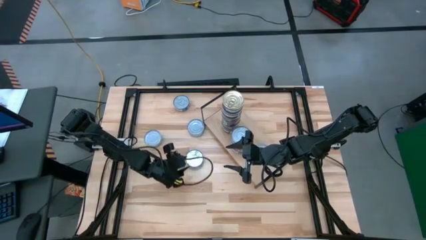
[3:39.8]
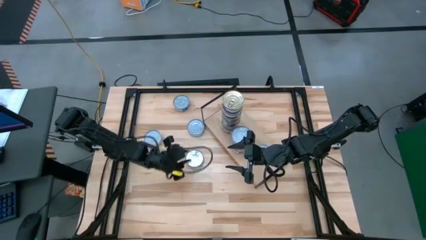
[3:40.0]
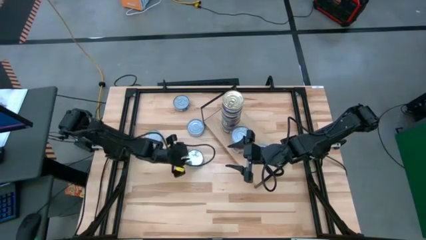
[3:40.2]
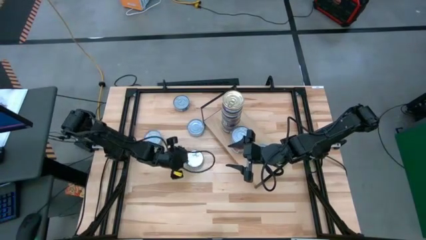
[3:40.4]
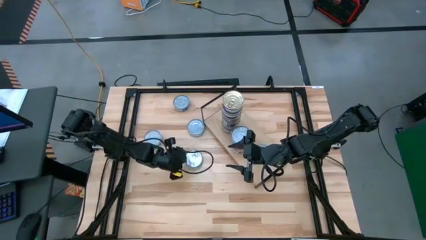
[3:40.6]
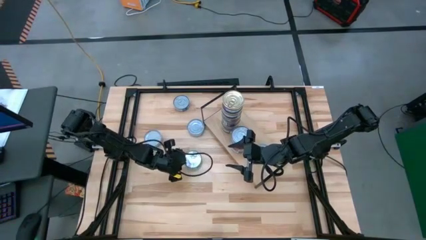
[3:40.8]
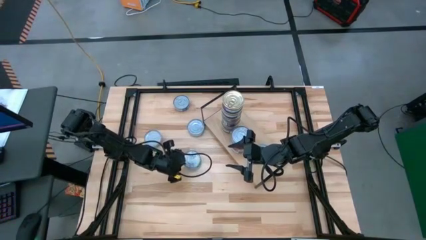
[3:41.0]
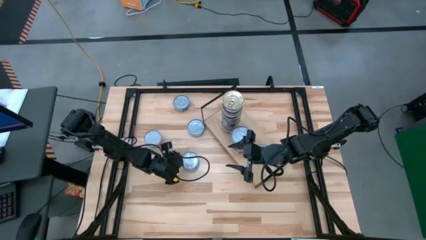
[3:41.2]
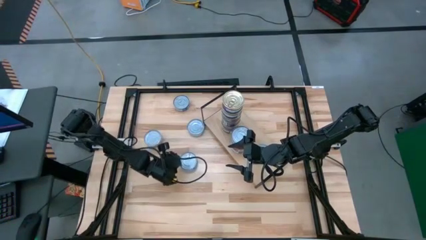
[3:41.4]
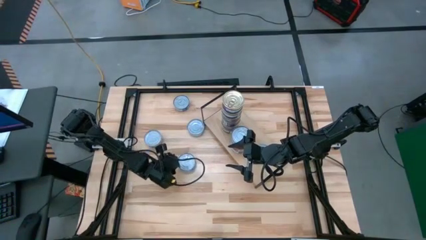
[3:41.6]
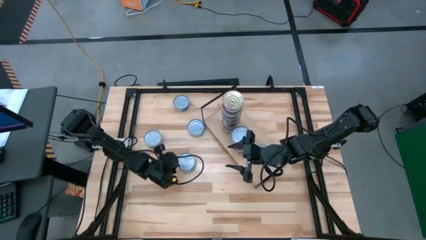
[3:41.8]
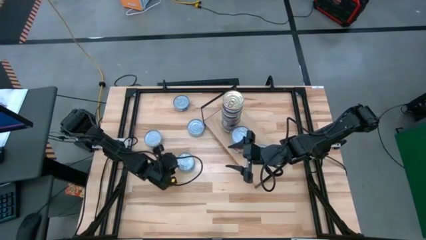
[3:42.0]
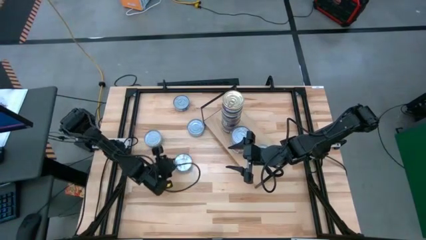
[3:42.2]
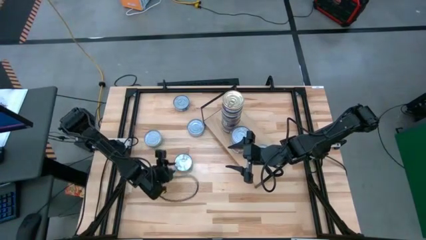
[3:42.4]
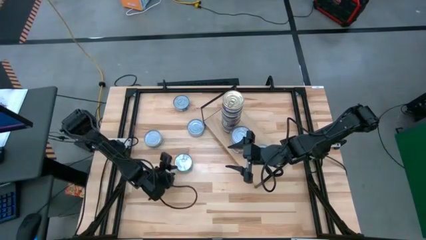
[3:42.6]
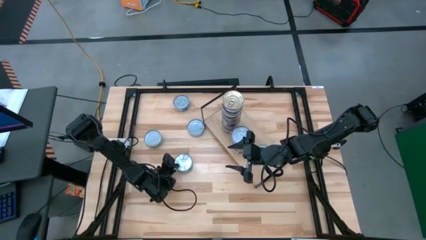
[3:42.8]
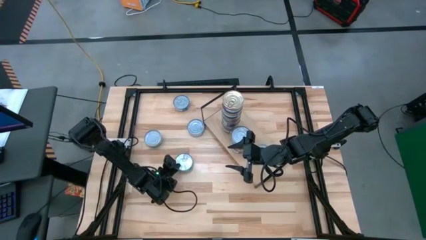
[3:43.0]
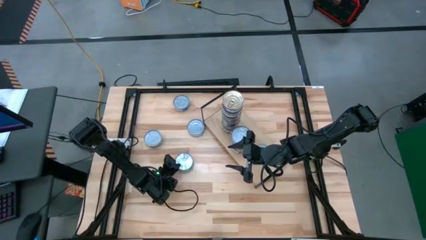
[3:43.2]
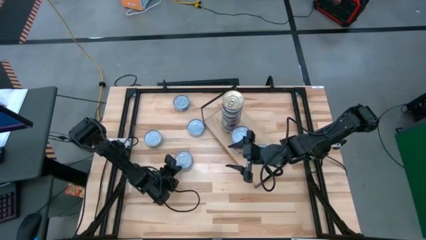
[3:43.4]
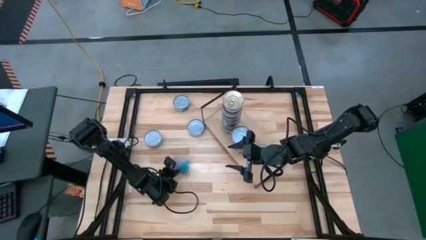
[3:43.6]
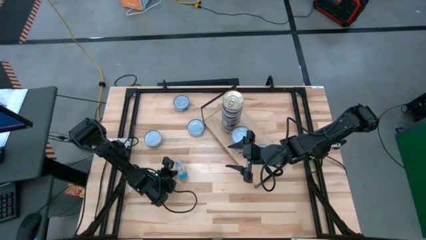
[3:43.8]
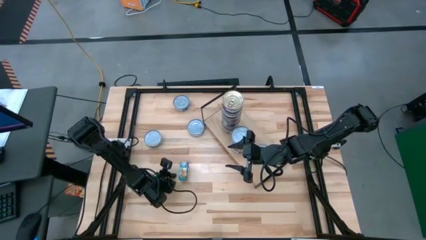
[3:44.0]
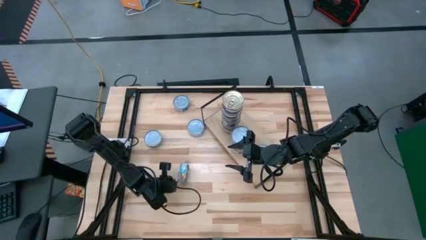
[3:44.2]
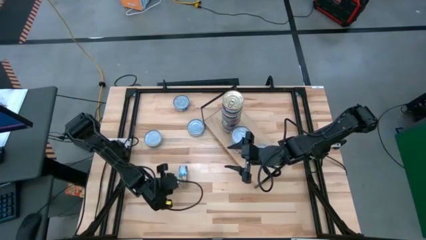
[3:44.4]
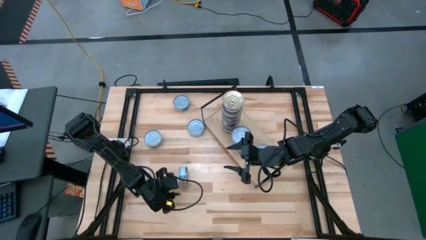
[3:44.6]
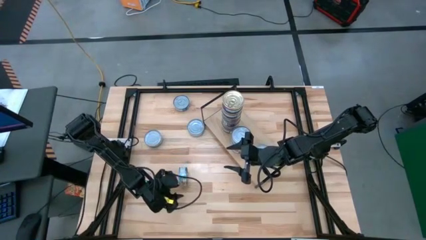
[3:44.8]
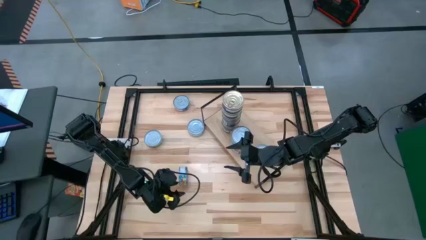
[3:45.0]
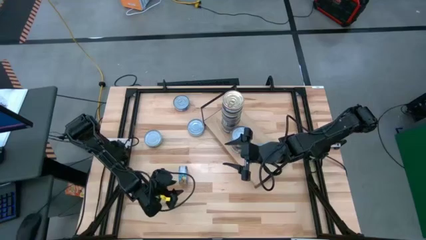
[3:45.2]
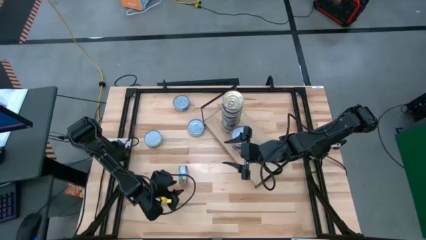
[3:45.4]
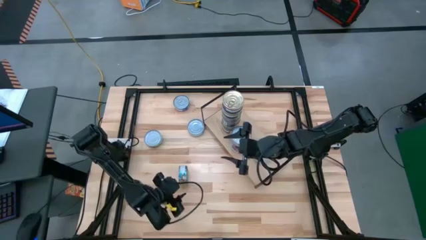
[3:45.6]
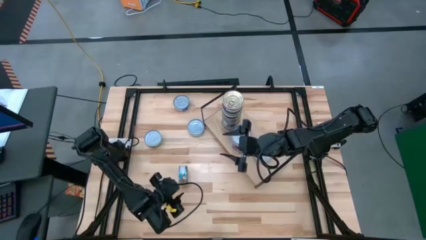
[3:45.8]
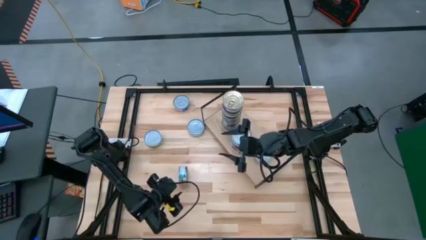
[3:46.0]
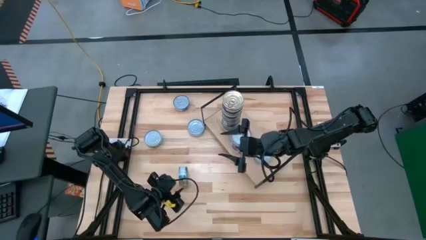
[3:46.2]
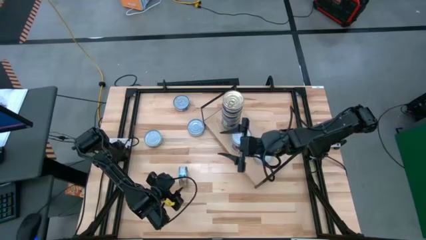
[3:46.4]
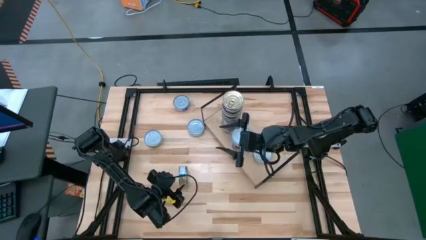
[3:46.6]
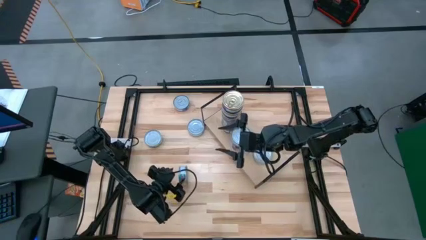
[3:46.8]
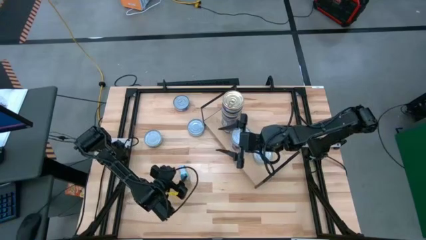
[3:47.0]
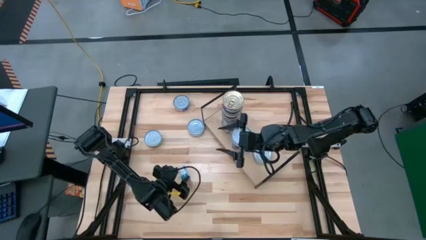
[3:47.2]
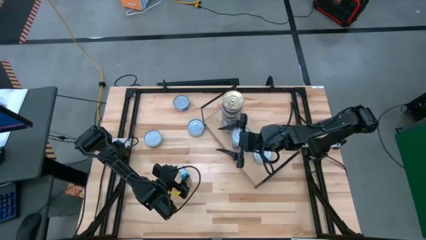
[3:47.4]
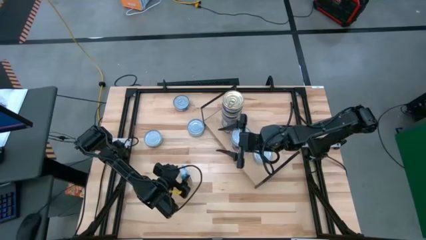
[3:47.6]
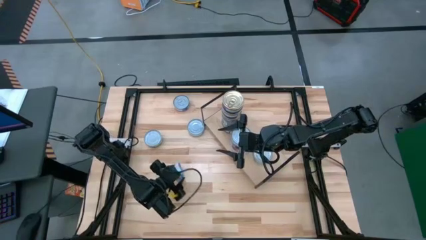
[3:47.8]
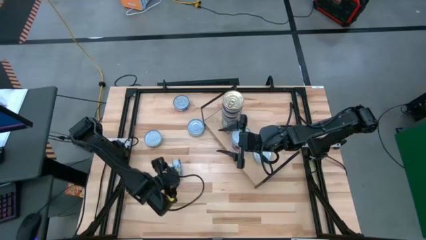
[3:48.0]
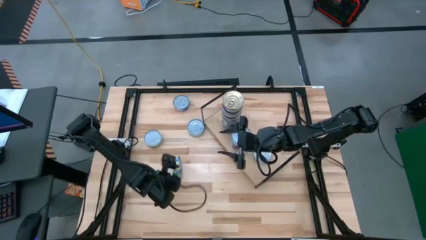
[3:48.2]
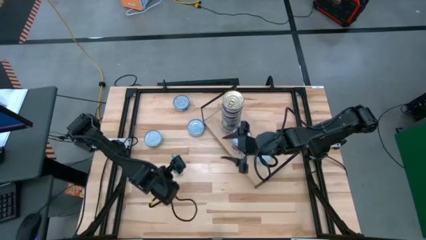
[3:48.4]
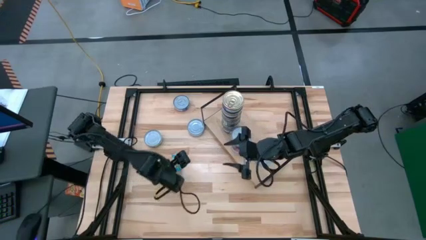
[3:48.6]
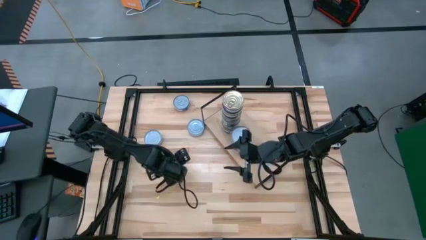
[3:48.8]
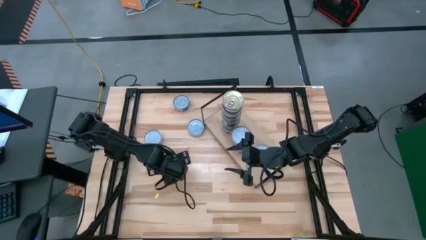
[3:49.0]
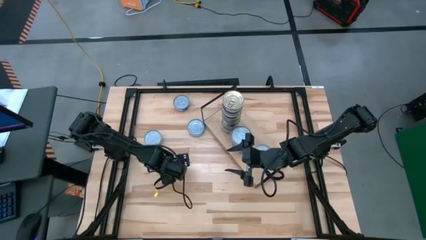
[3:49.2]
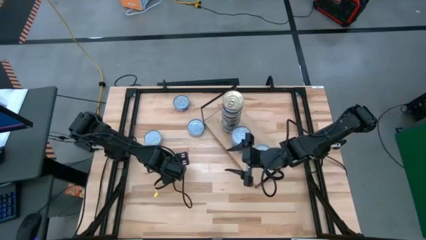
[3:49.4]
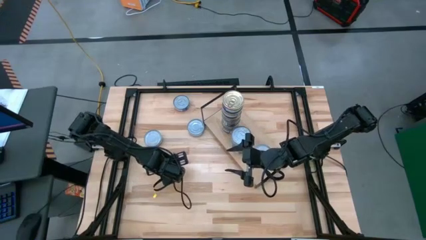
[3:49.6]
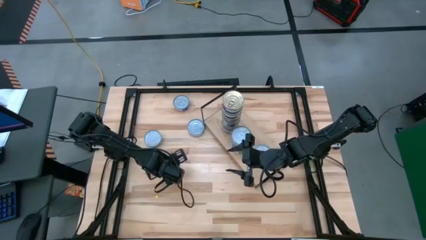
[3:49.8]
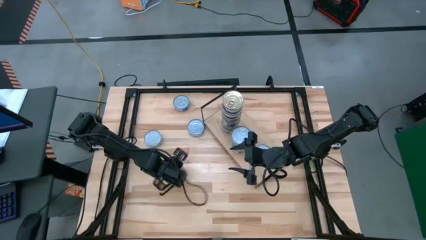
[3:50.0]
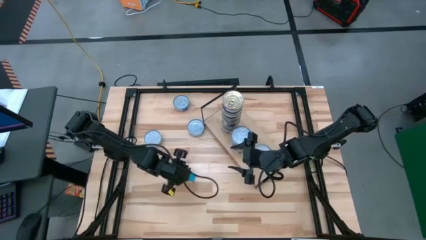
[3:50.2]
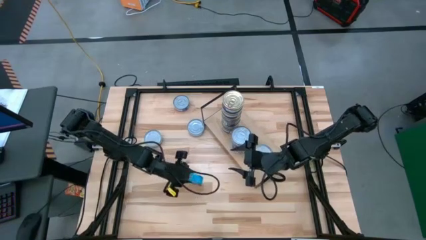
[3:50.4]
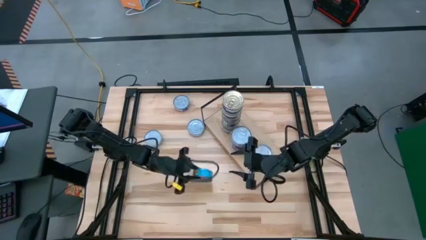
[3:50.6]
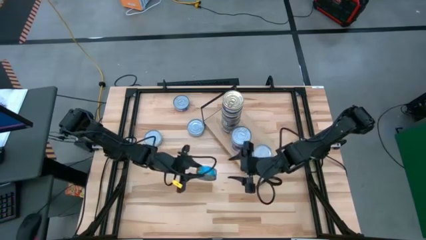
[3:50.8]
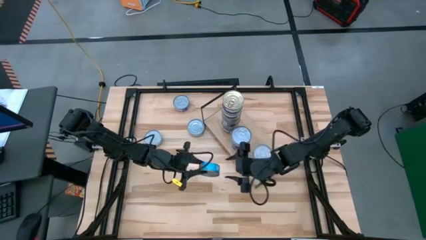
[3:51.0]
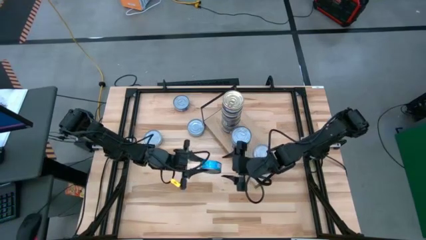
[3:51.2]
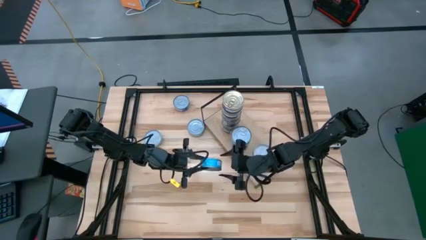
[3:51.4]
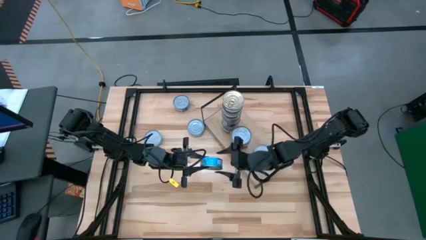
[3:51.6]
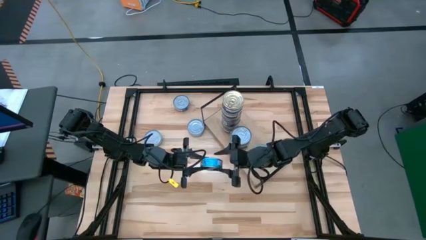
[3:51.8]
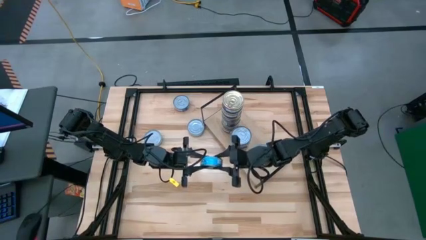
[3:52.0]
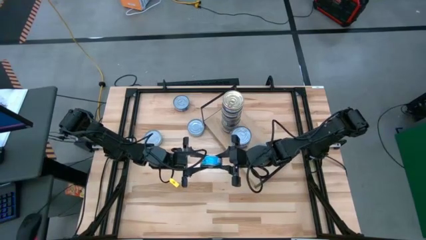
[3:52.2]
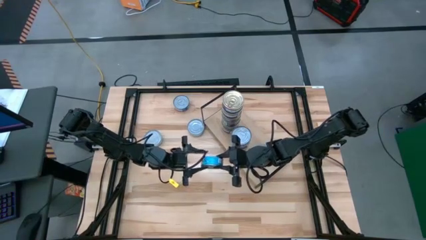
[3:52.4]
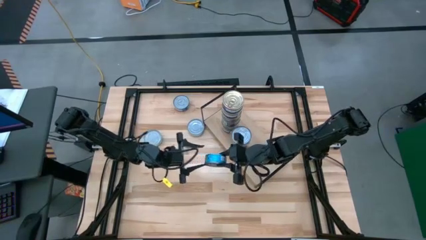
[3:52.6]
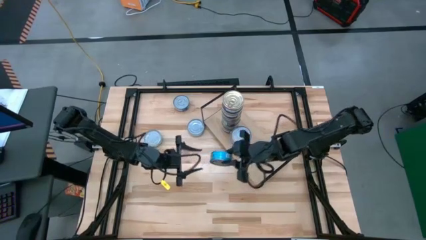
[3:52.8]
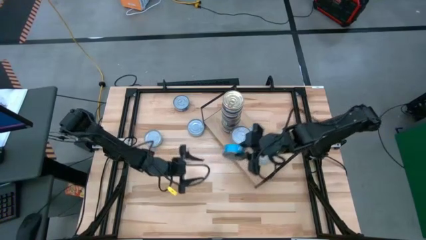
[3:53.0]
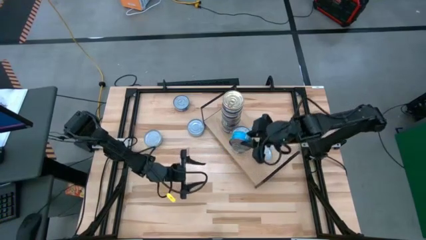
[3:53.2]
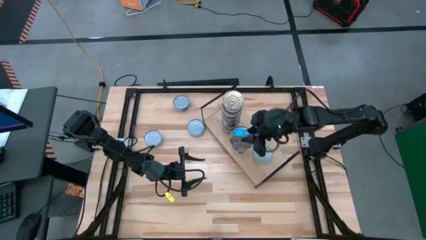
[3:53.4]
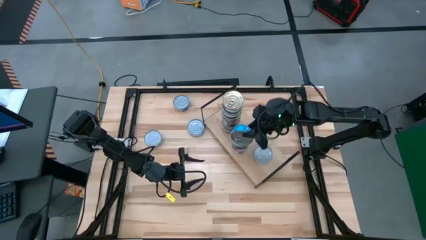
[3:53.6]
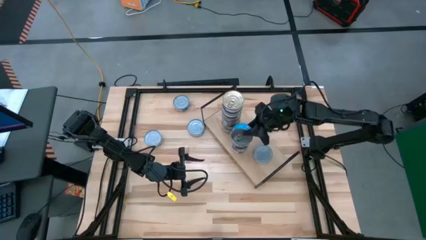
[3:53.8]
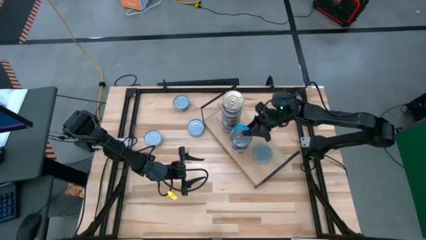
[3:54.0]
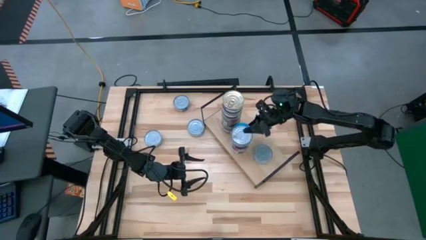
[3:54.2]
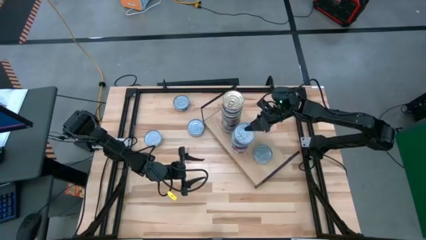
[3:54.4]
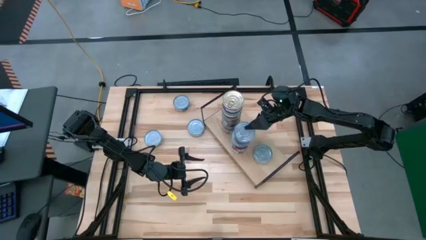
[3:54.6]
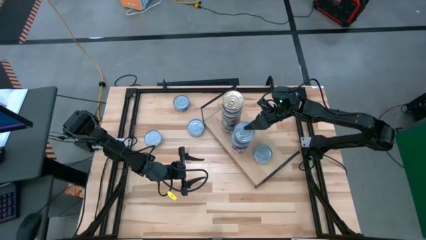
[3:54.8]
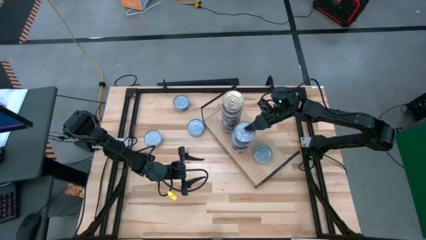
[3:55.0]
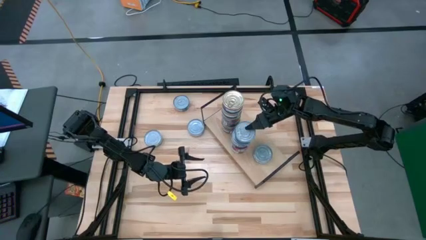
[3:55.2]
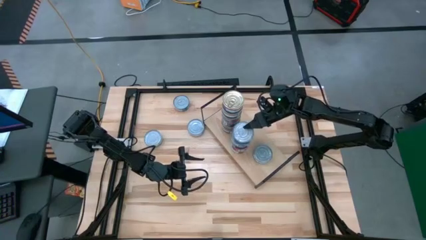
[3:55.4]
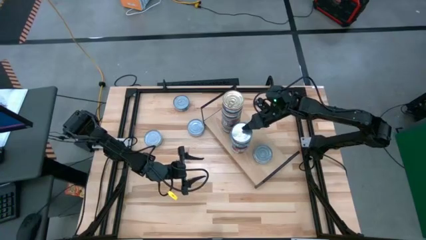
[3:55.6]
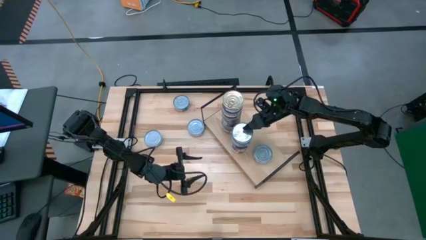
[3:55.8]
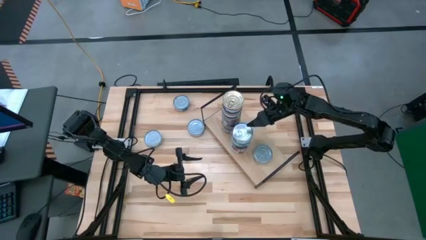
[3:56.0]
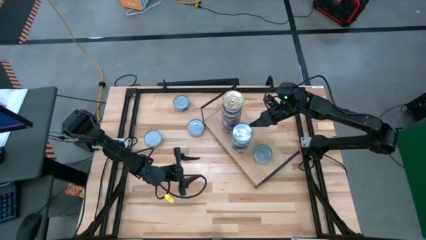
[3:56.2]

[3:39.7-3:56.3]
Task: Stack canned seafood by type on shelf
Stack the blue tuna can on top of the blue tuna can on the shelf
